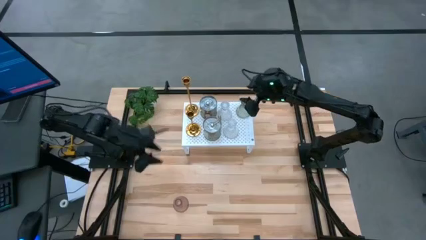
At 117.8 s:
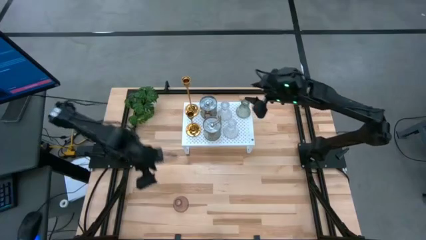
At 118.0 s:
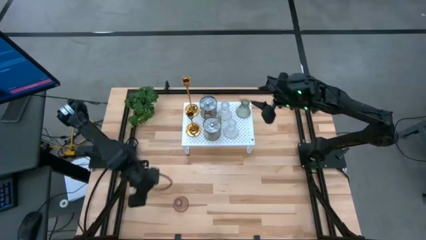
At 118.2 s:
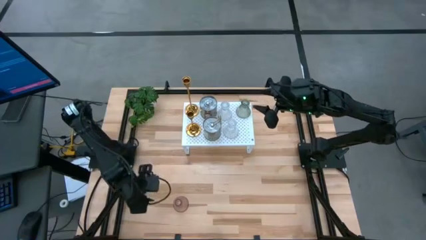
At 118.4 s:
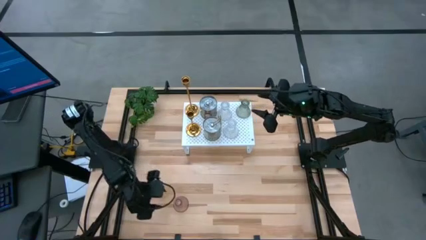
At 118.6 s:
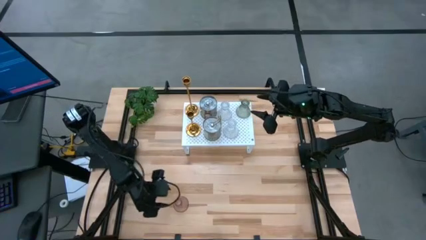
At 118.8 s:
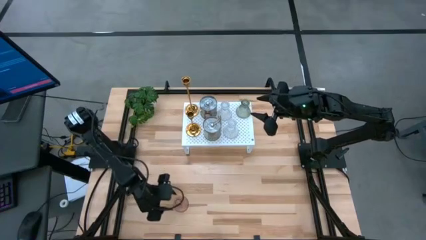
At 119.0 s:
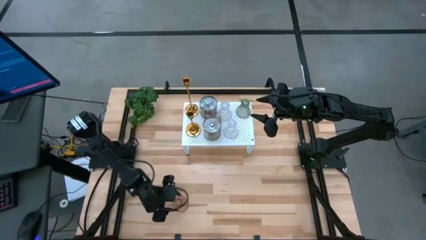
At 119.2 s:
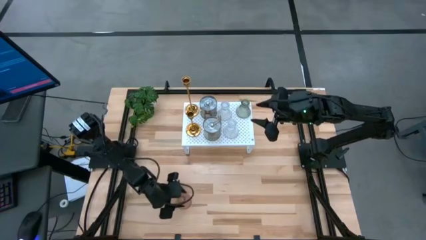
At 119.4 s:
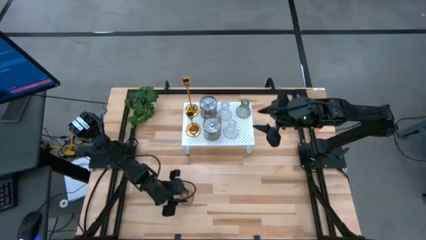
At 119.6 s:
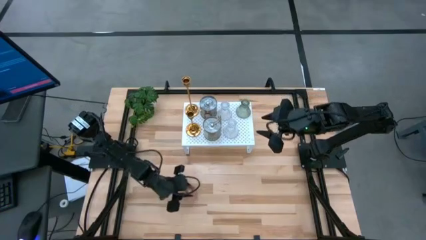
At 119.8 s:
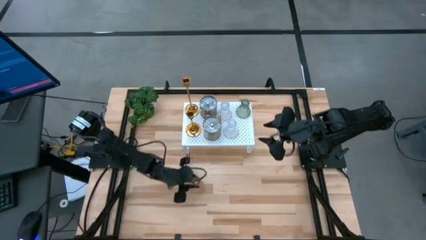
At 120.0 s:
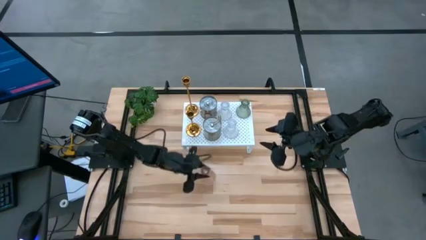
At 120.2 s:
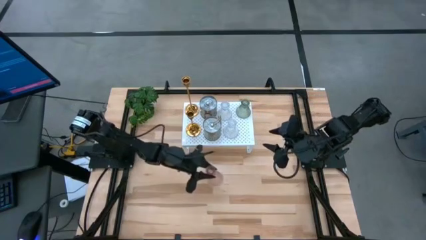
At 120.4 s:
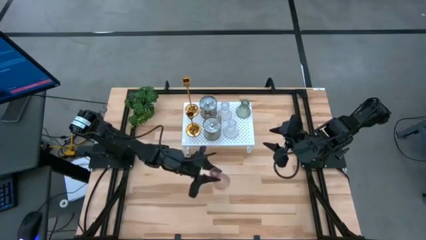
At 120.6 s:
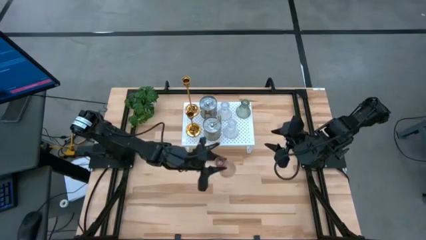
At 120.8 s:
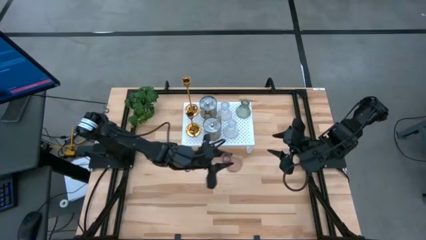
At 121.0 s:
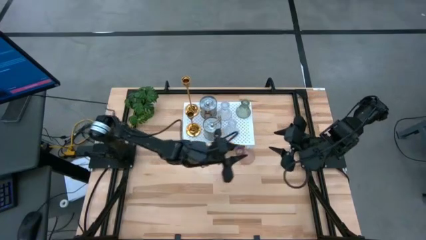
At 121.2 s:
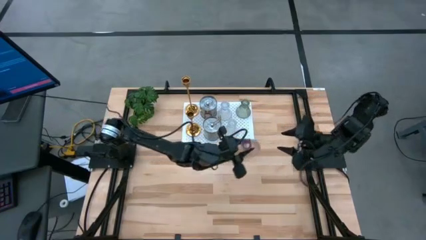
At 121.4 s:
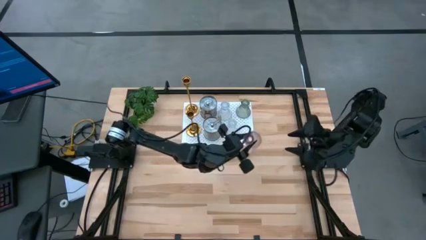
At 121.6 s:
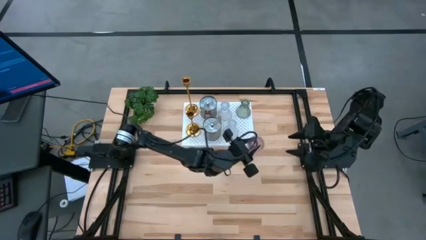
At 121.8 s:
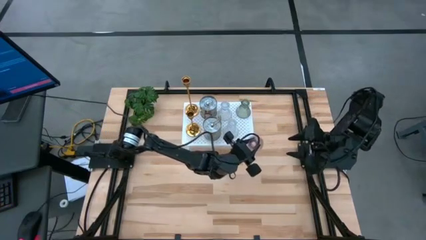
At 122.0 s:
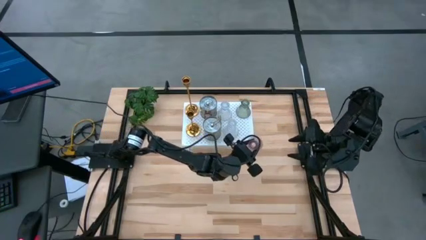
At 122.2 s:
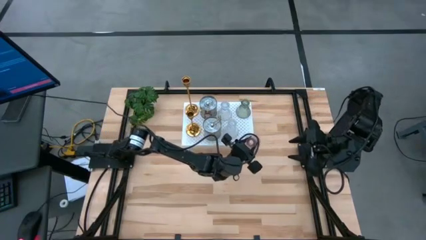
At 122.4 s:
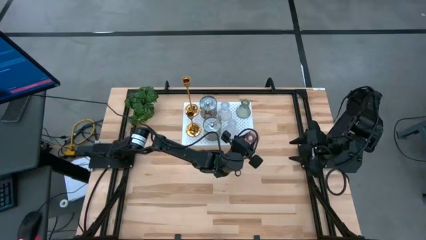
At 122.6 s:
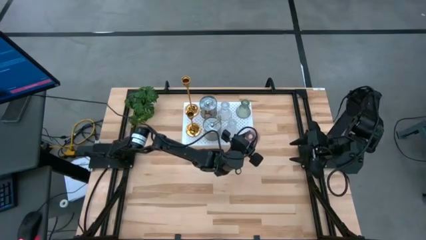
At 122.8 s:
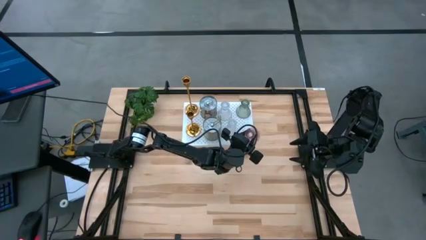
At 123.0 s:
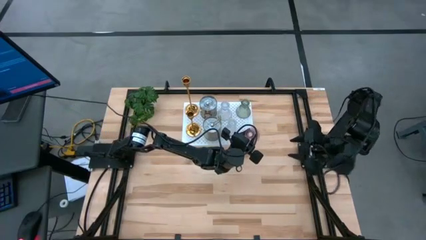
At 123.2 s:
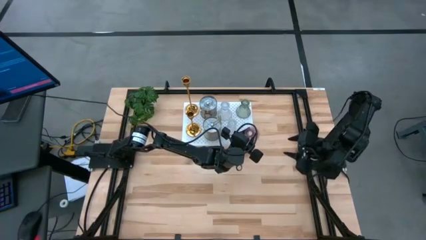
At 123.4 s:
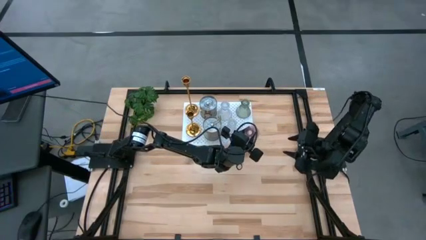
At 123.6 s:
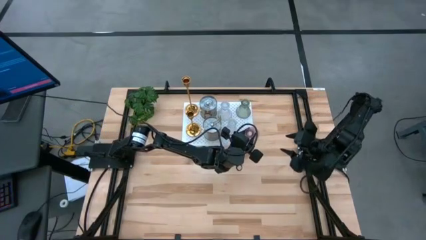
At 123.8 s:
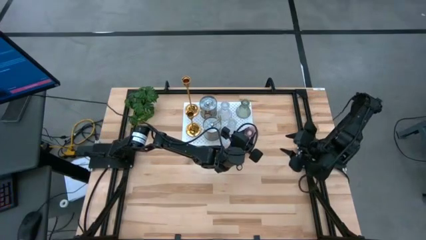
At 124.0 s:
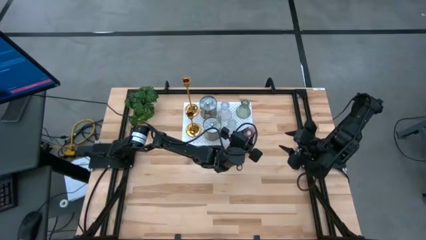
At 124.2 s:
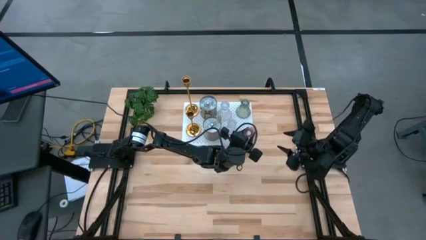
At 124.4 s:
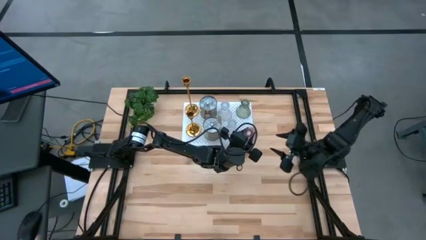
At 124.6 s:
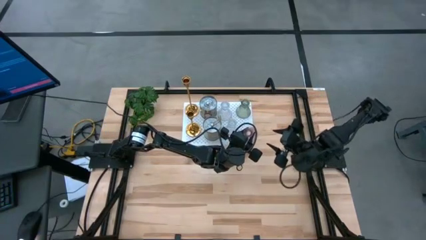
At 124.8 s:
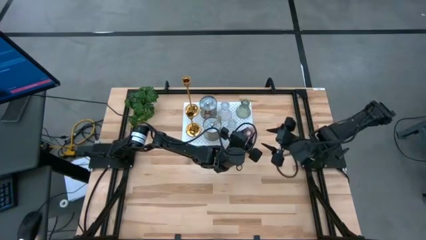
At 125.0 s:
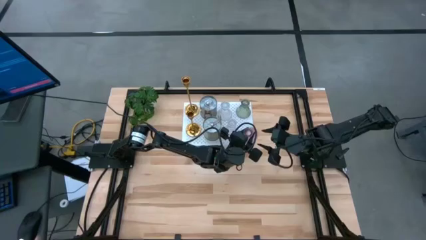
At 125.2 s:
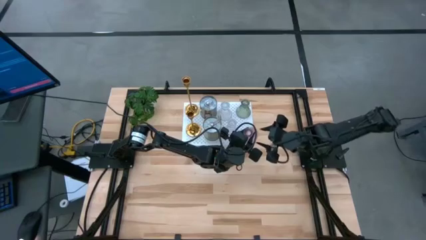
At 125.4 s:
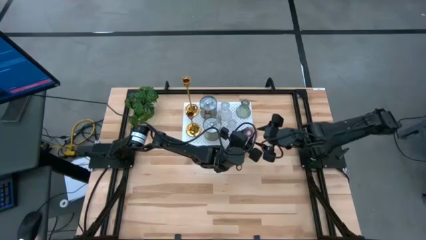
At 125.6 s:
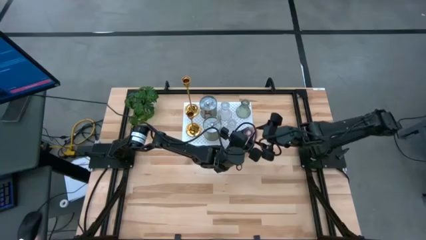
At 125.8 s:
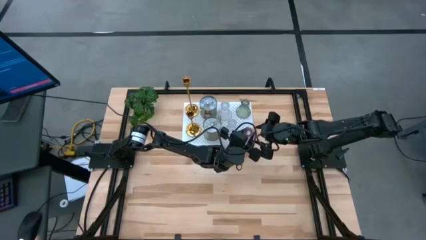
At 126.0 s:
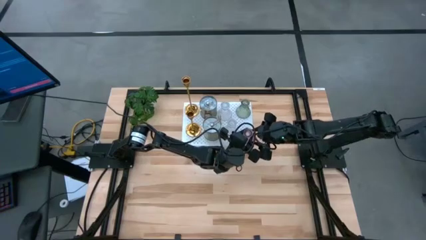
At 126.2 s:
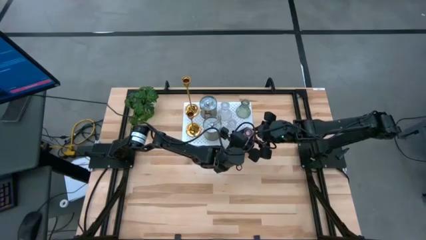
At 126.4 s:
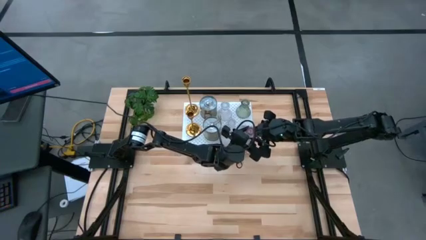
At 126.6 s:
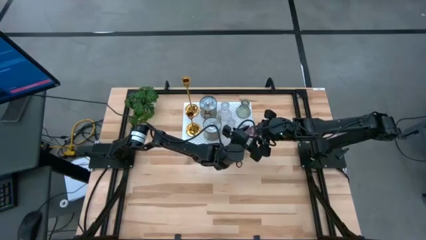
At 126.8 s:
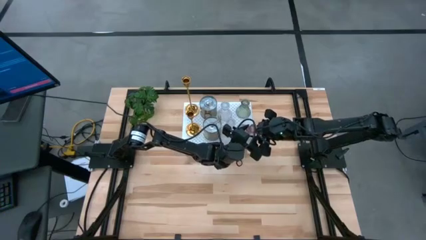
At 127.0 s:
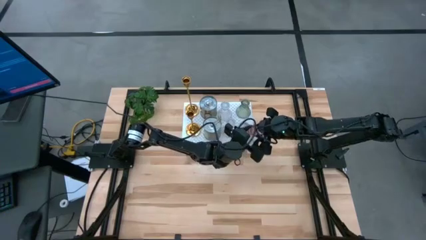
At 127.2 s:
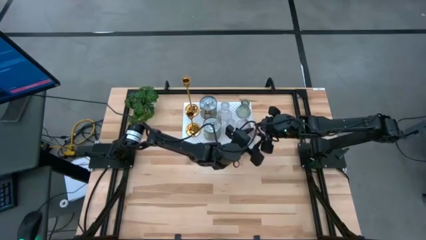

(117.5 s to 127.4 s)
Task: Pick & Place candle stick holders
Put the purple glass candle holder on the shelf

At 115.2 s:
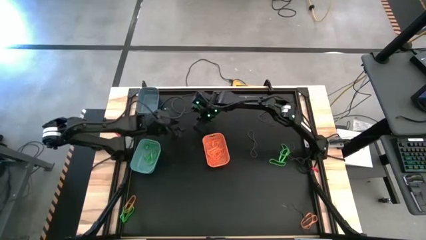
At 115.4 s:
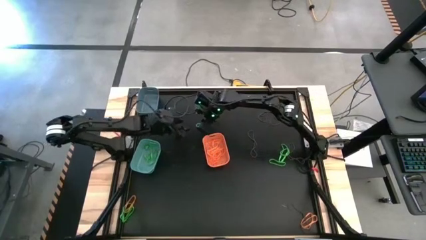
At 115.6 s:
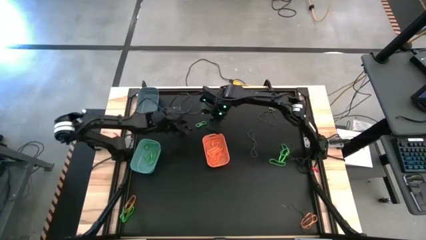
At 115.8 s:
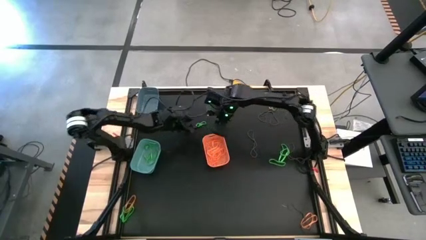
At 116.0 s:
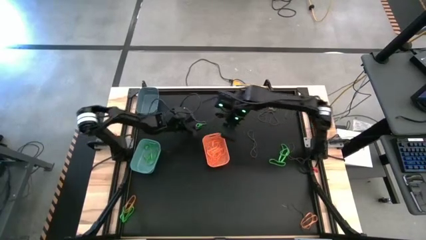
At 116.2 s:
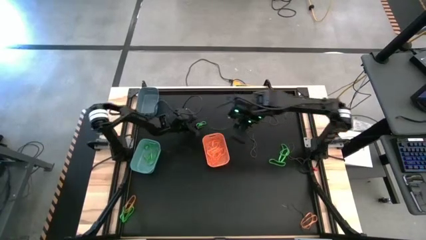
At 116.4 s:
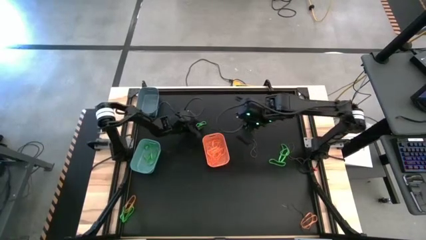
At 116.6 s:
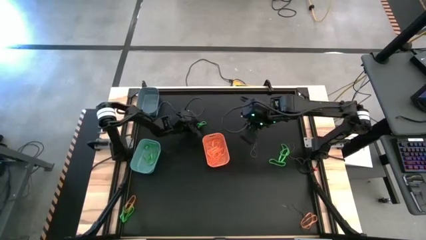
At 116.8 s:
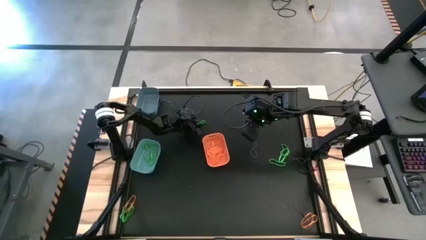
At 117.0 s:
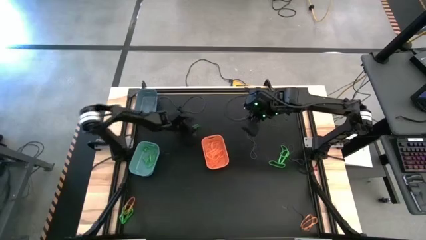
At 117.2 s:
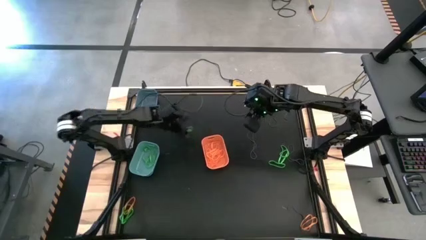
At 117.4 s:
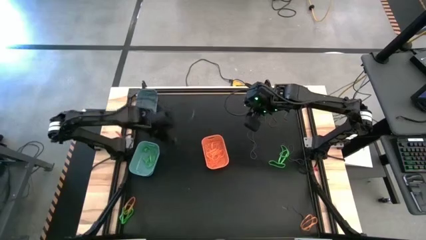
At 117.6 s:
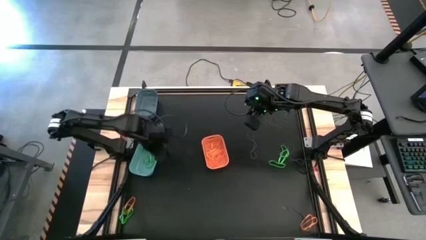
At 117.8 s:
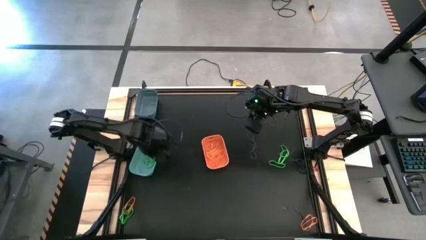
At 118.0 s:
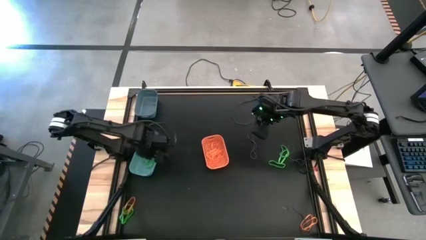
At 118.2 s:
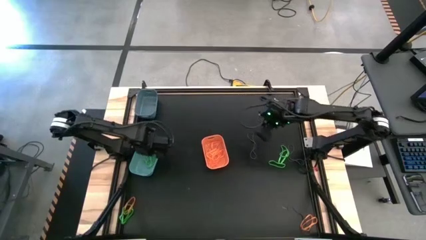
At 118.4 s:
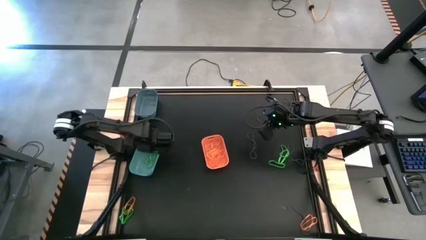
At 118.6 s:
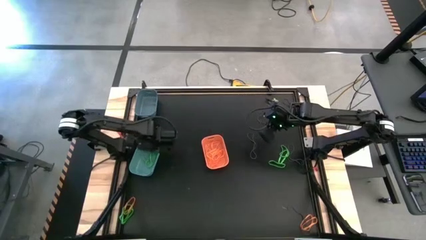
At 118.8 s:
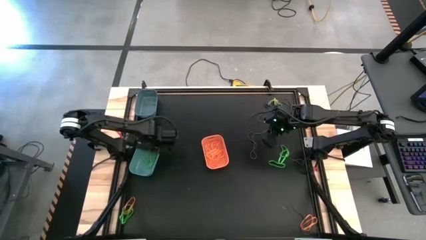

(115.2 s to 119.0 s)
Task: Sort rubber bands into baskets
Put the green rubber band into the light sea green bin

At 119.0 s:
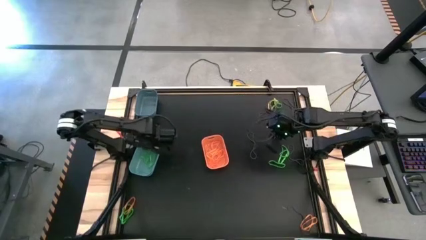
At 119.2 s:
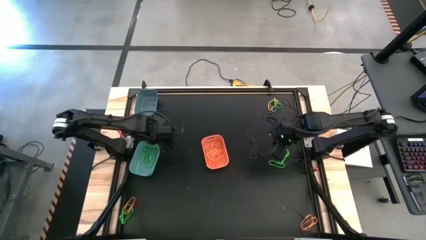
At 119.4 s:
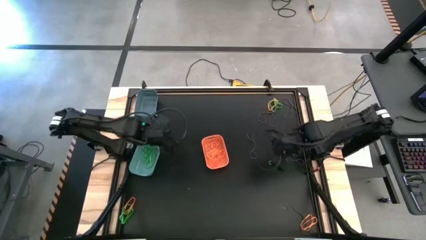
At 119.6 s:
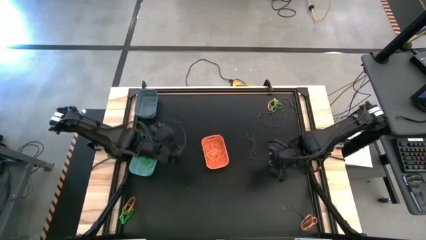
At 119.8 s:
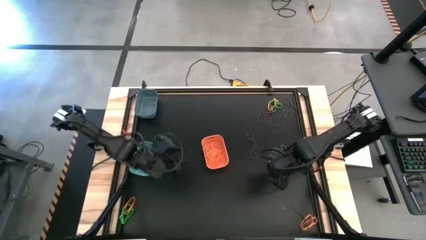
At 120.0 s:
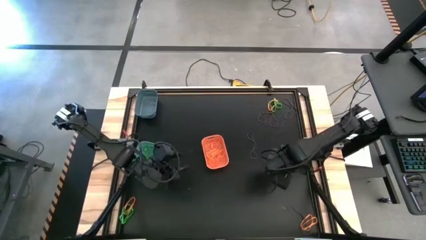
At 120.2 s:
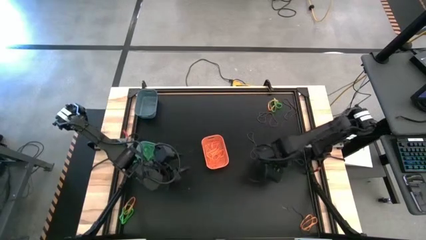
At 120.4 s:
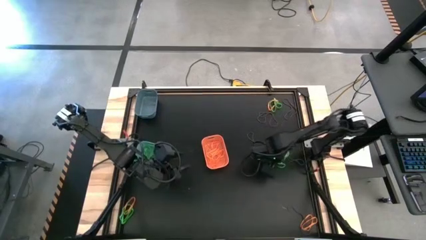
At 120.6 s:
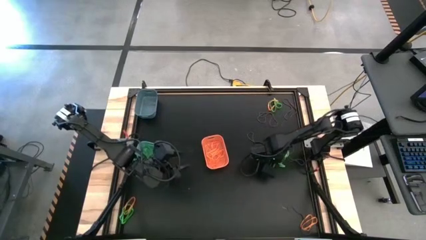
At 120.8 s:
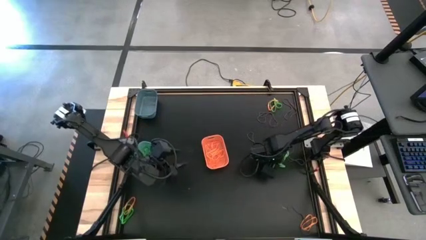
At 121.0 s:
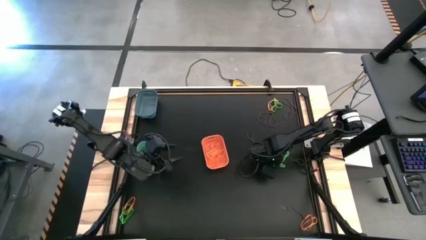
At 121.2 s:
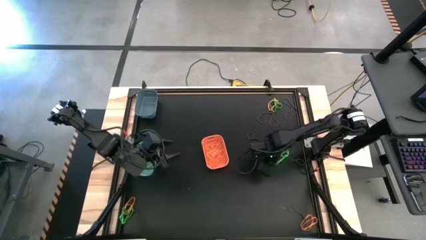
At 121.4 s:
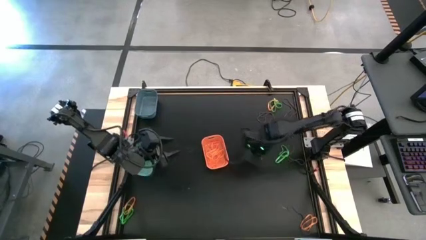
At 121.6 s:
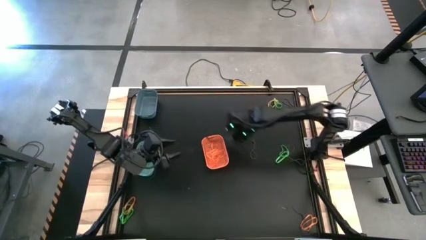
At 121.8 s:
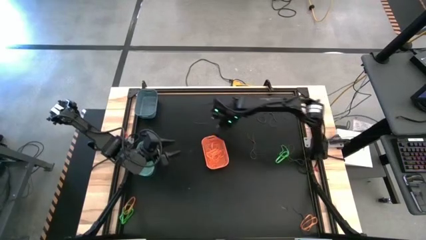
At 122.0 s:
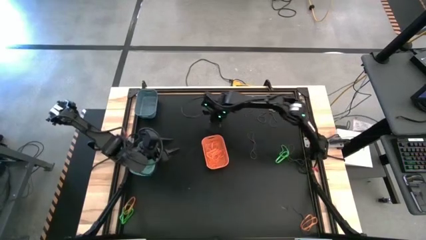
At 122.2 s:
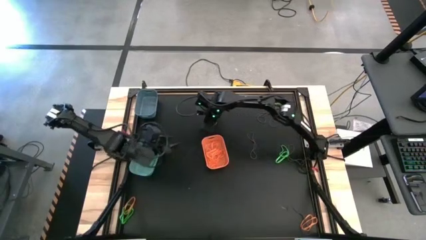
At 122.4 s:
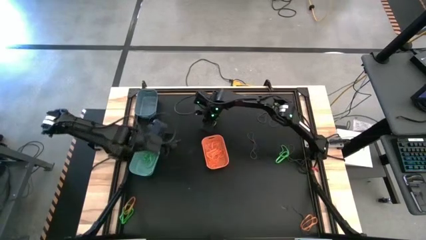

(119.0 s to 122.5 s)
Move the green rubber band
